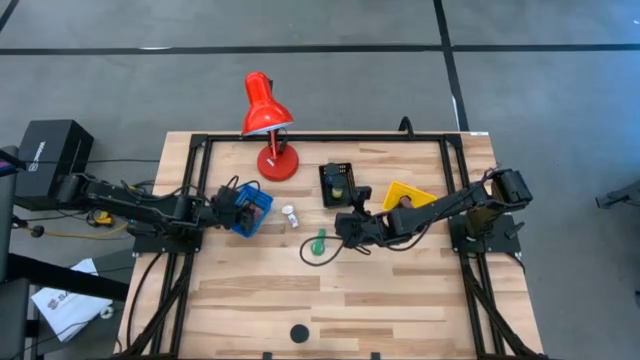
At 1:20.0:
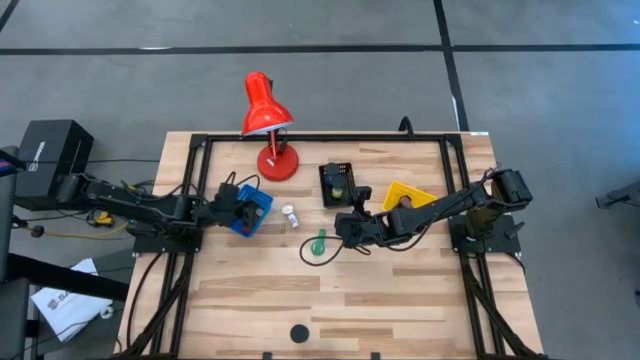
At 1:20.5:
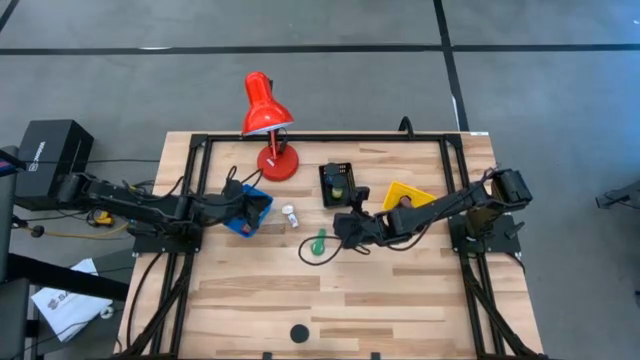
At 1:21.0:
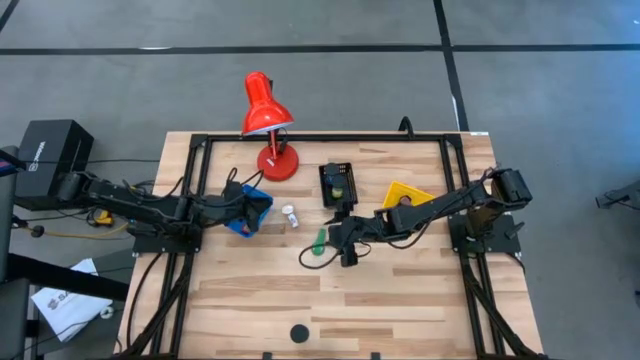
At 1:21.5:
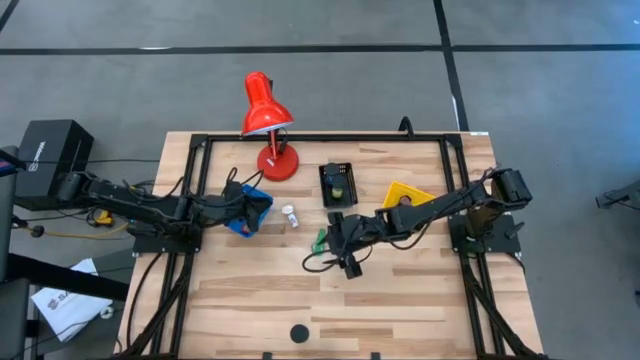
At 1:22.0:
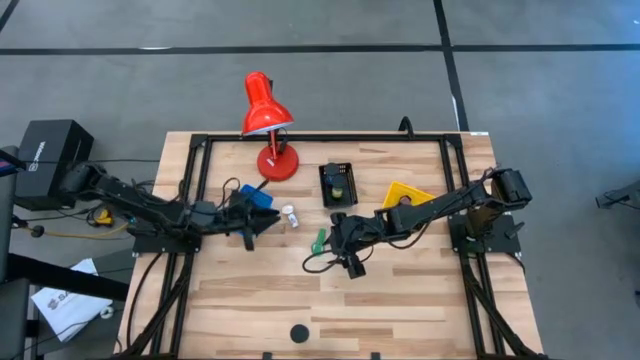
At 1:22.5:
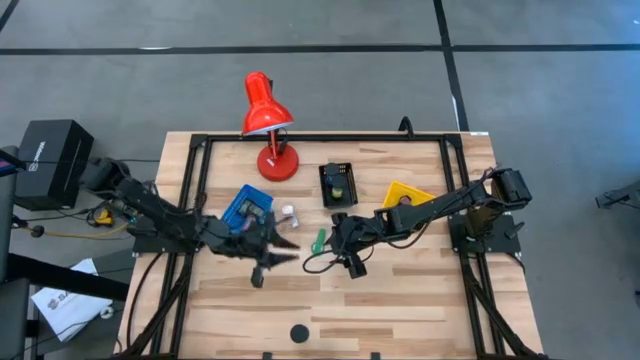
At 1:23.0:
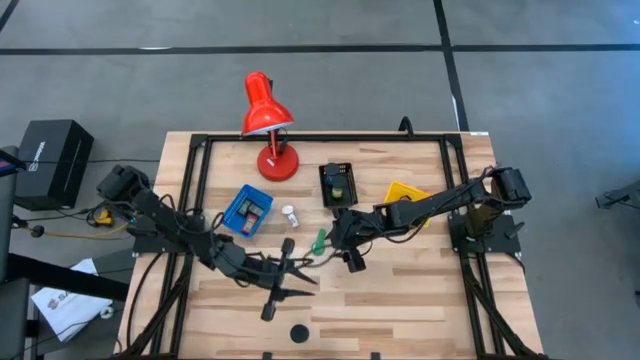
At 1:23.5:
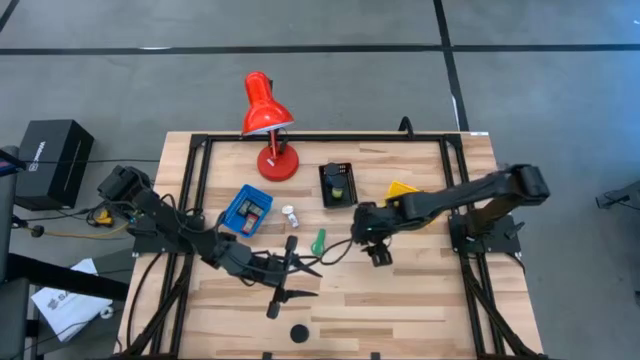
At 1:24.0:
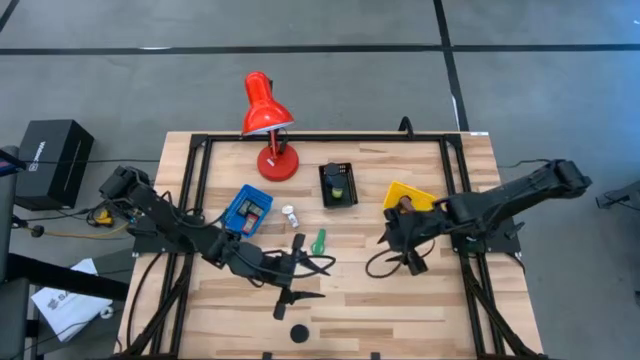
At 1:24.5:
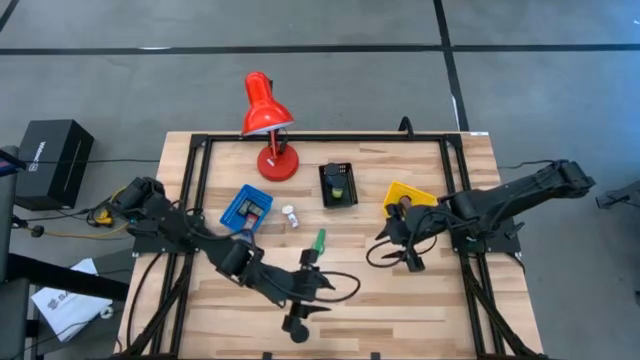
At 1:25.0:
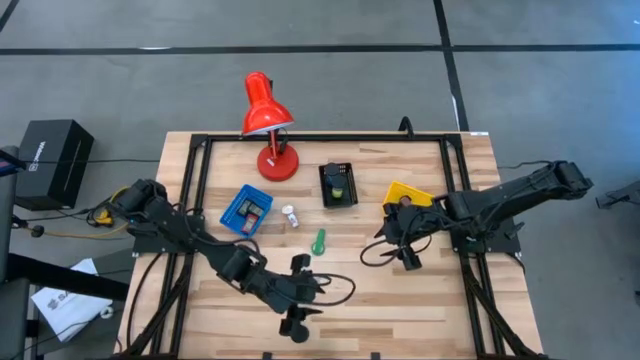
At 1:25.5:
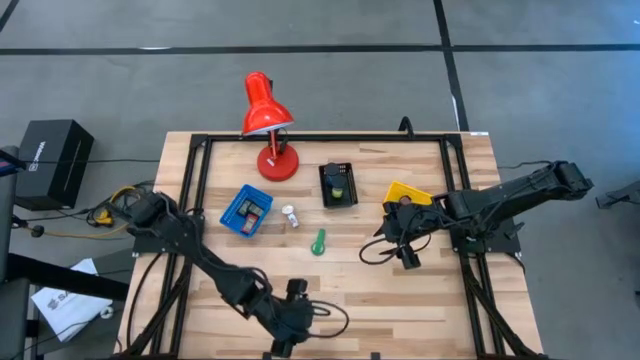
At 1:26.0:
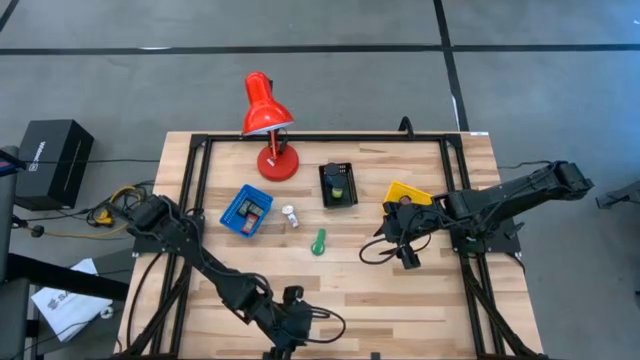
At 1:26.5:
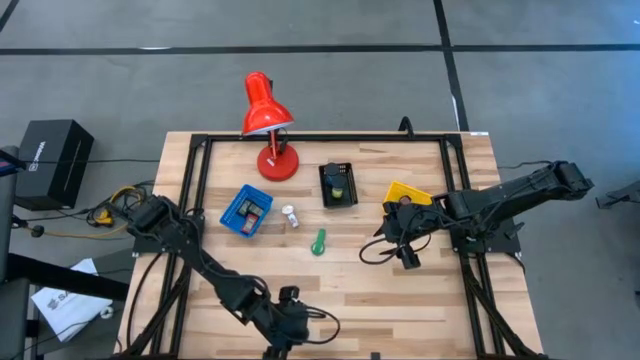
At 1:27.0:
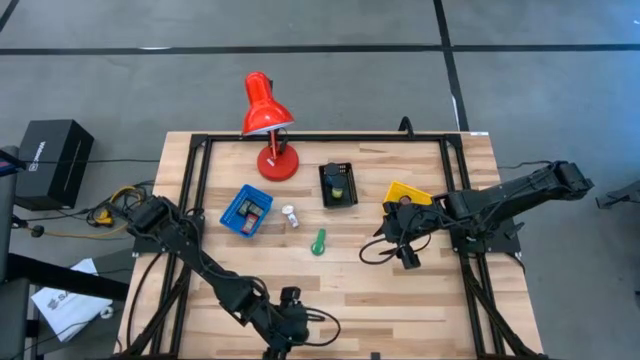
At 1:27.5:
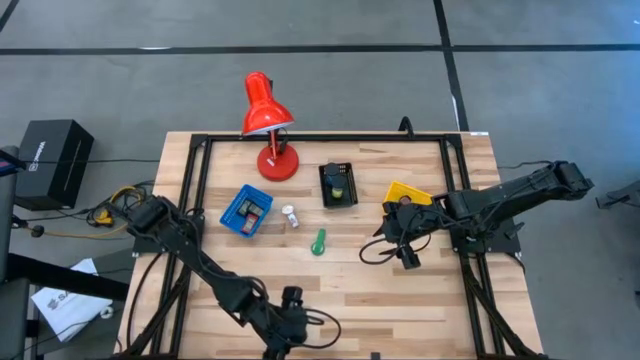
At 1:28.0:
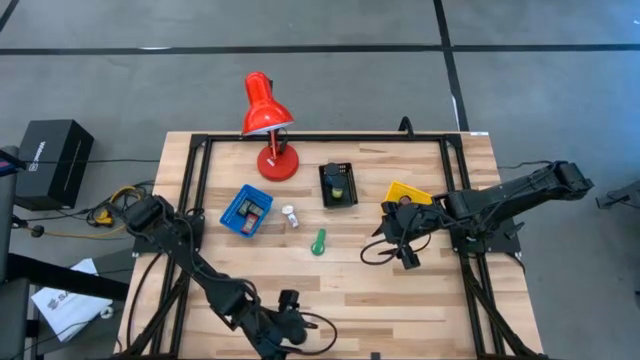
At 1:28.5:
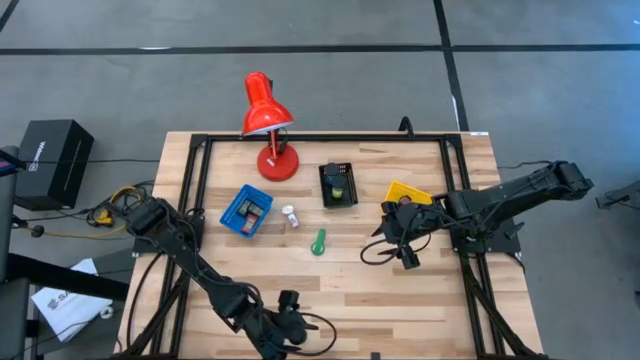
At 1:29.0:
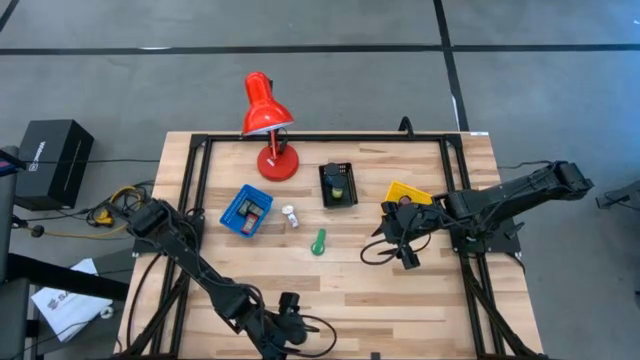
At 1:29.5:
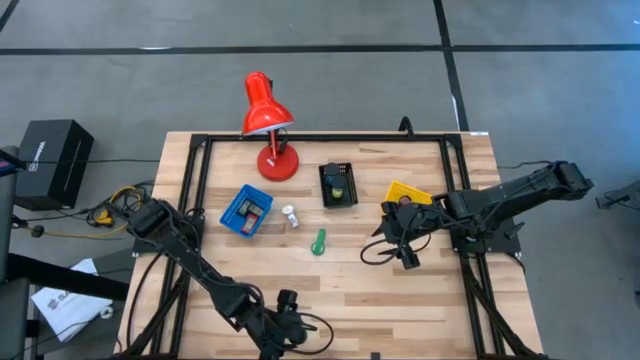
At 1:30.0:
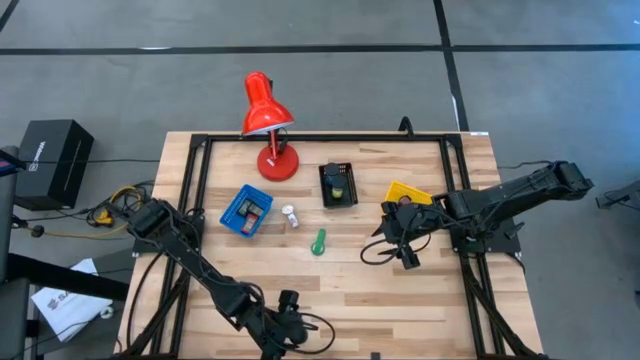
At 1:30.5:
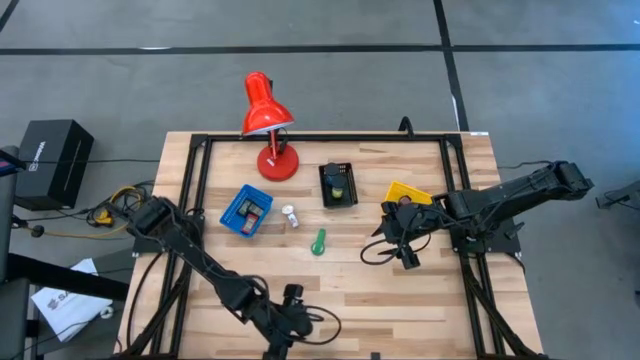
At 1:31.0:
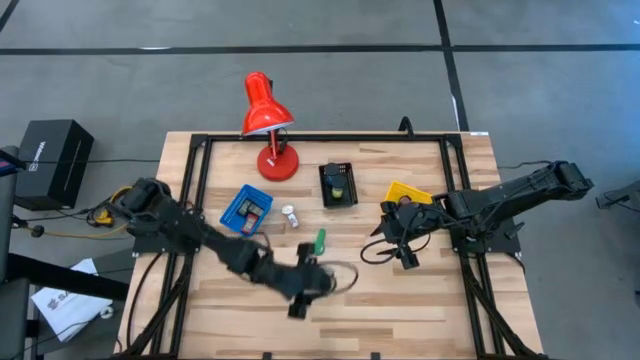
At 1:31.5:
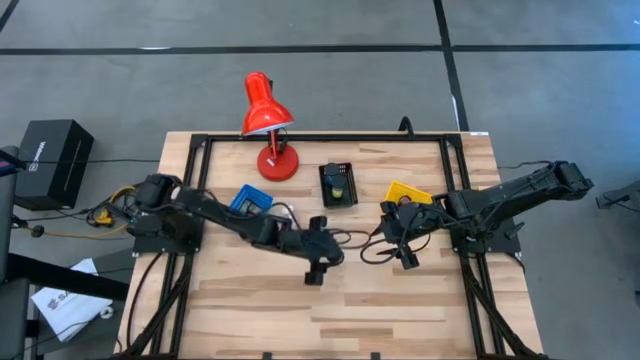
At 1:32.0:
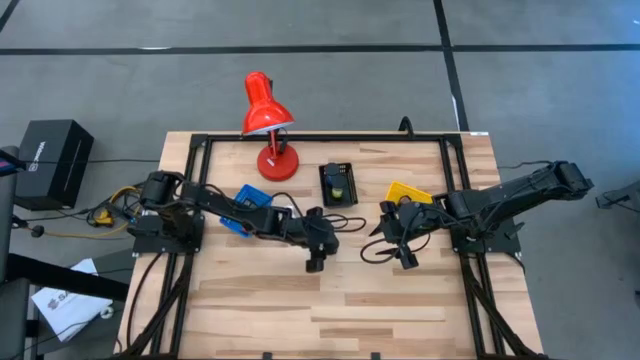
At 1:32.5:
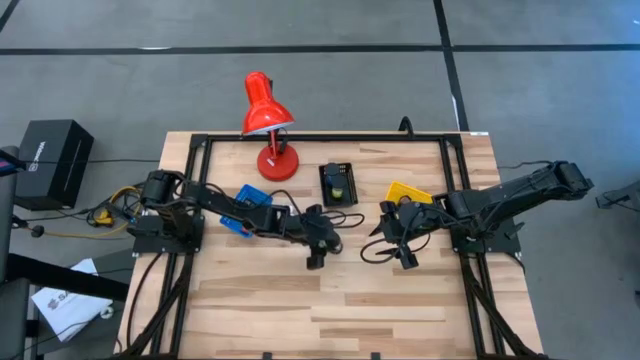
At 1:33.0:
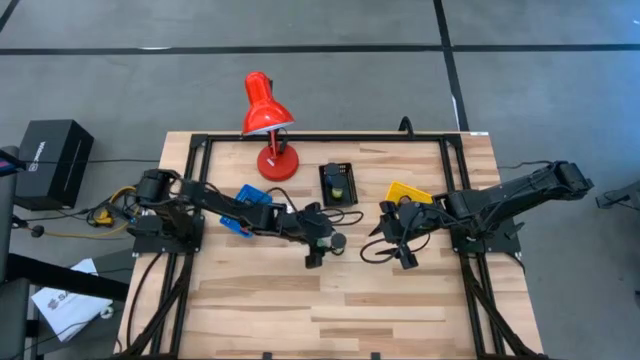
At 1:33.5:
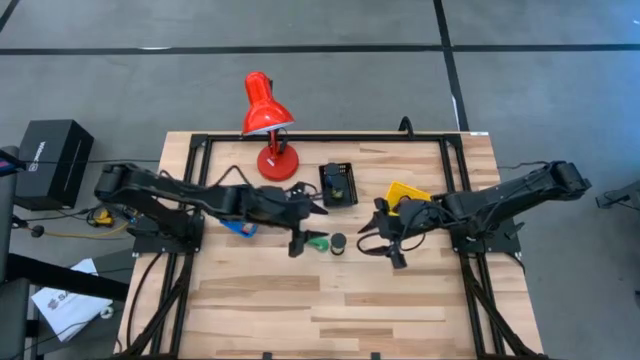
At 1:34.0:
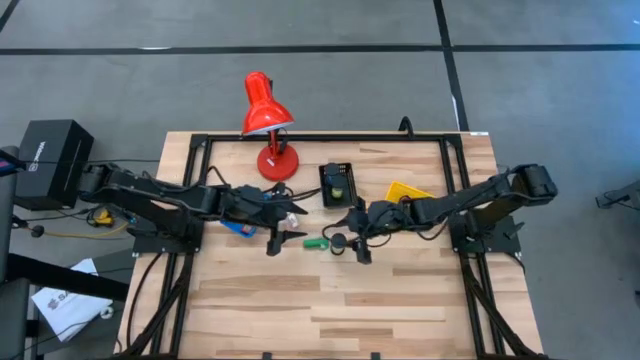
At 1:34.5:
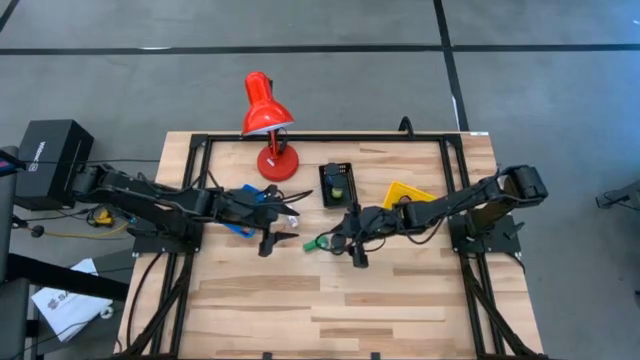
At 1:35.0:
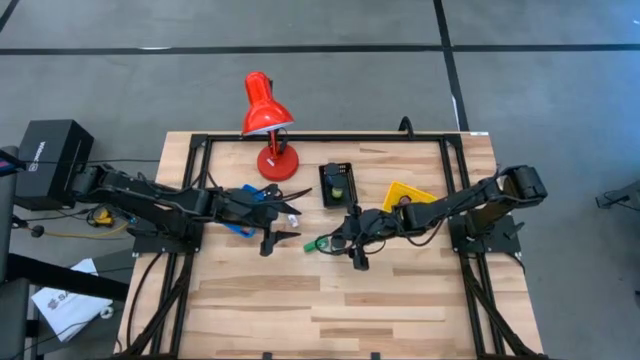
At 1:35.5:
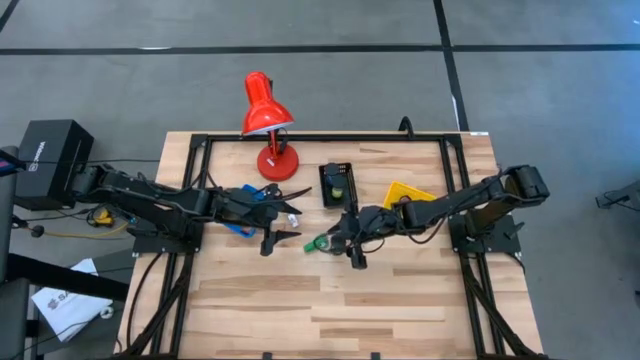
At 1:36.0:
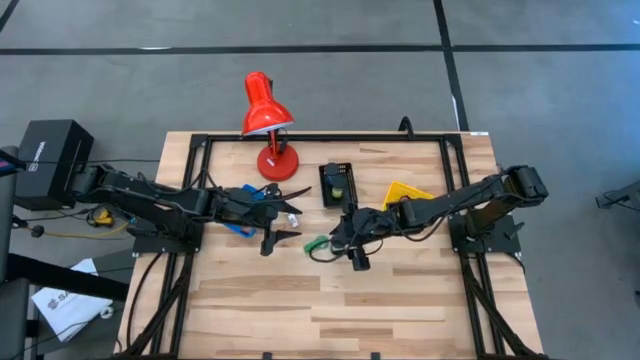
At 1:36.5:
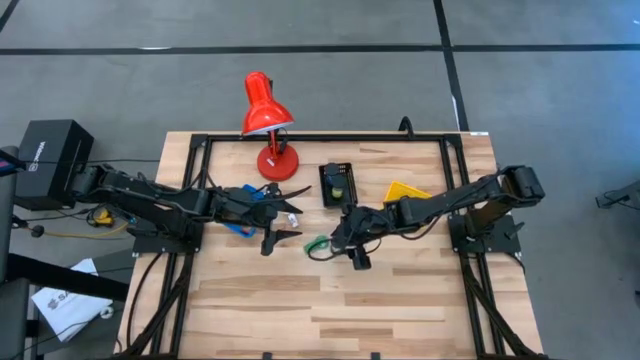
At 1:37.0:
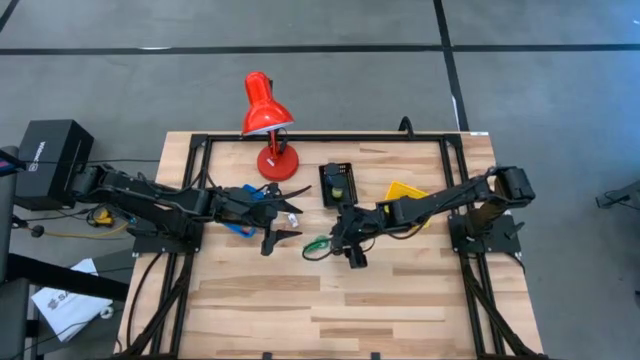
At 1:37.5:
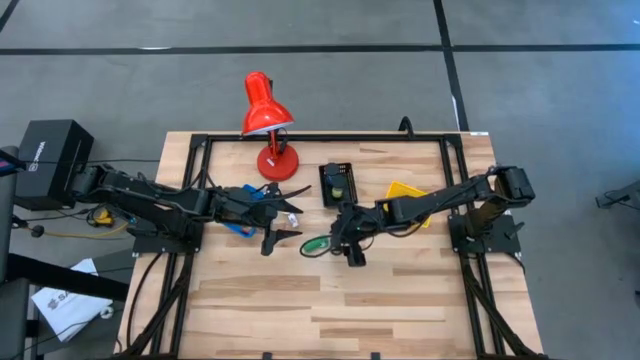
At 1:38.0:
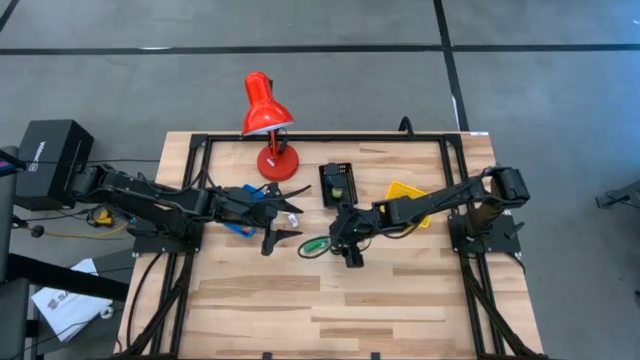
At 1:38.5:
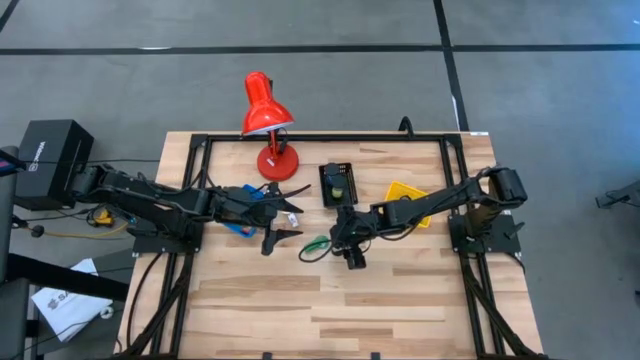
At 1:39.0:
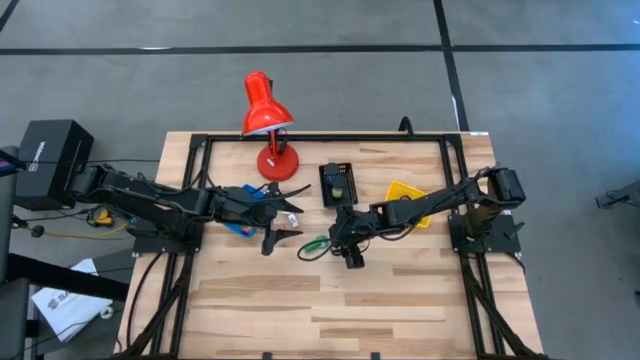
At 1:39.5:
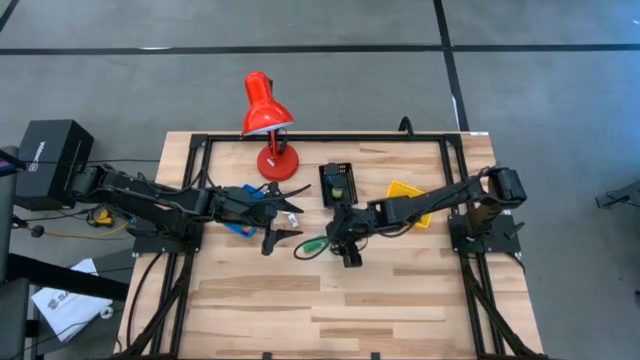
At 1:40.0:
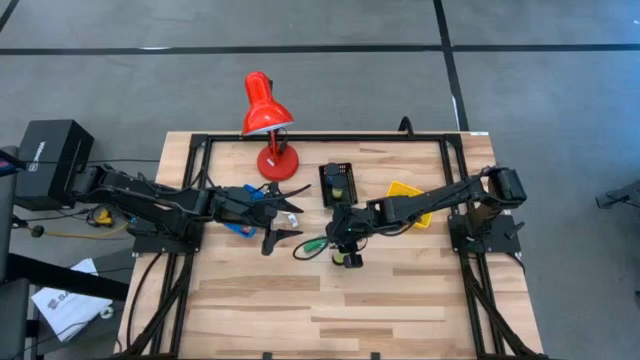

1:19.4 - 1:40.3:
Task: Pick & Place Office items
Put the yellow hourglass into the black basket
